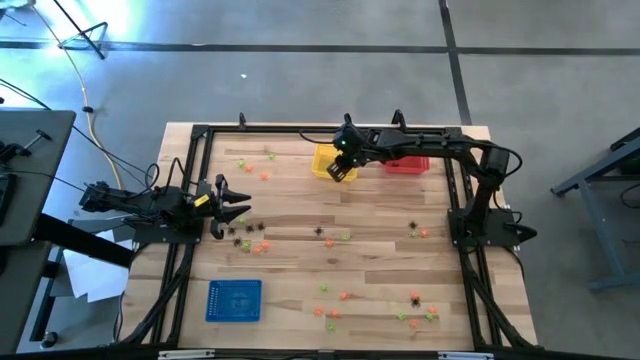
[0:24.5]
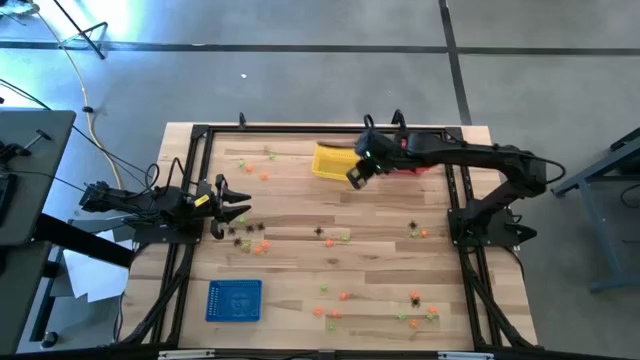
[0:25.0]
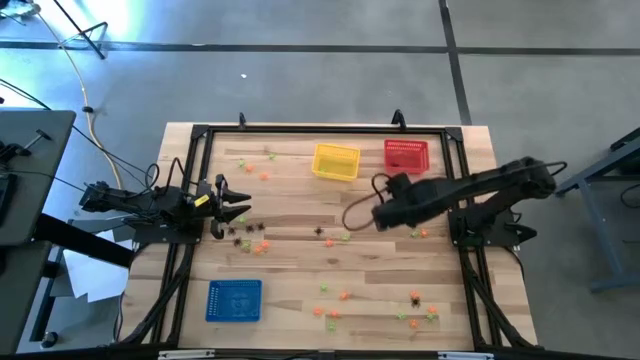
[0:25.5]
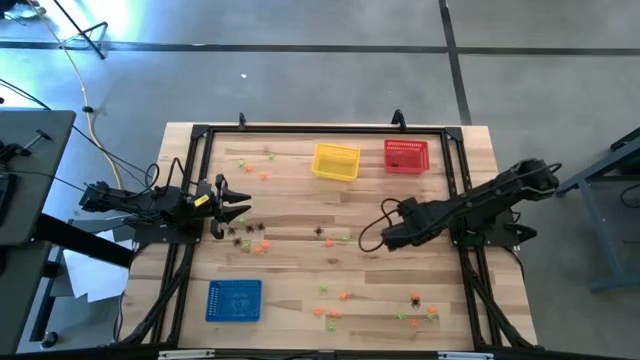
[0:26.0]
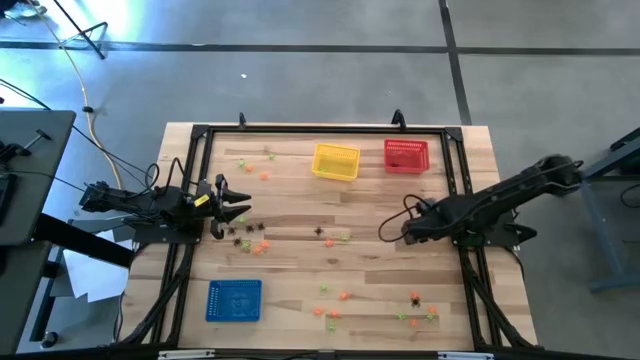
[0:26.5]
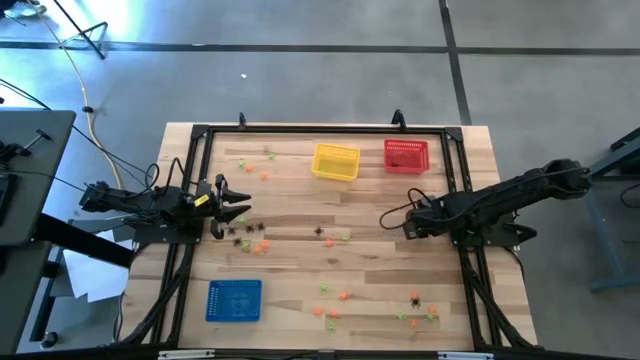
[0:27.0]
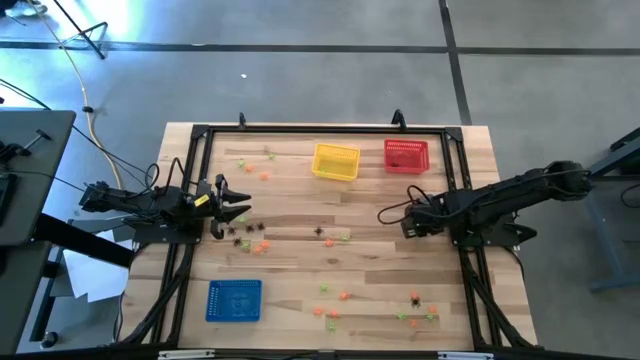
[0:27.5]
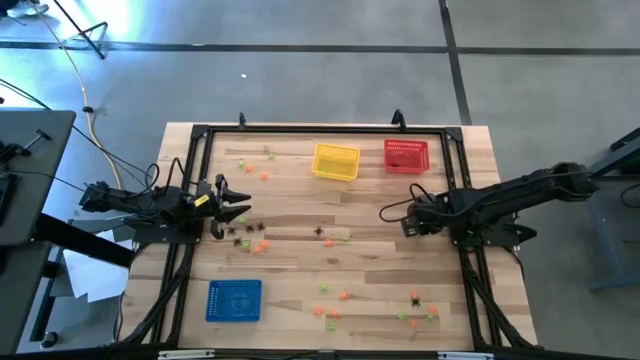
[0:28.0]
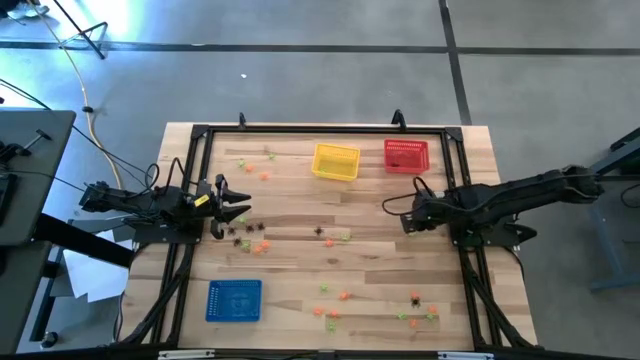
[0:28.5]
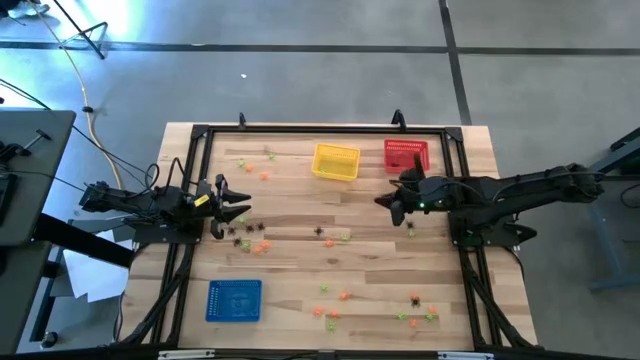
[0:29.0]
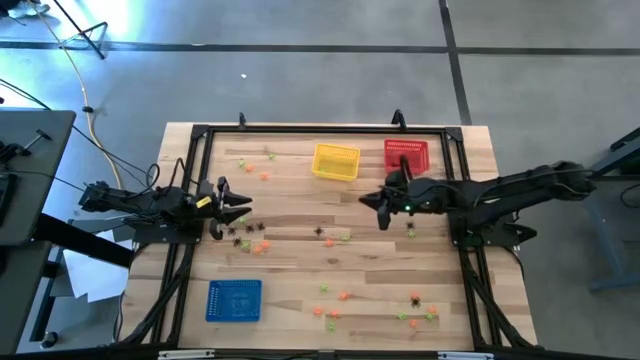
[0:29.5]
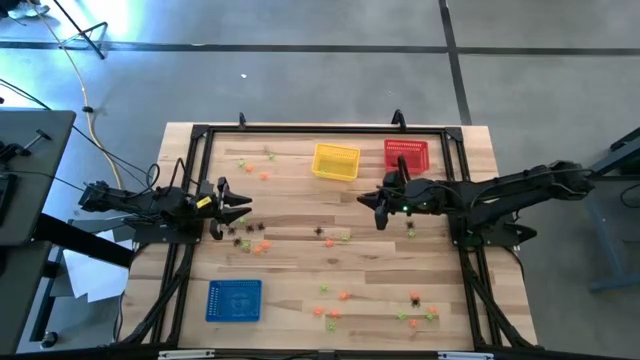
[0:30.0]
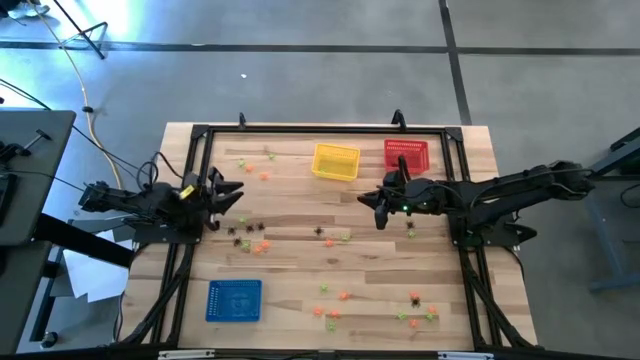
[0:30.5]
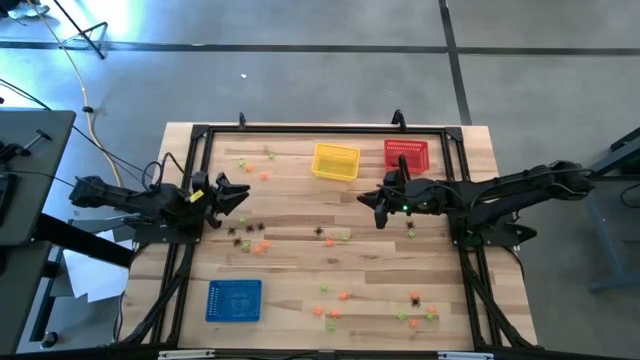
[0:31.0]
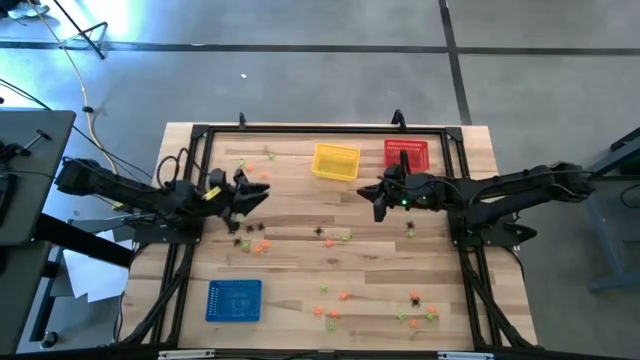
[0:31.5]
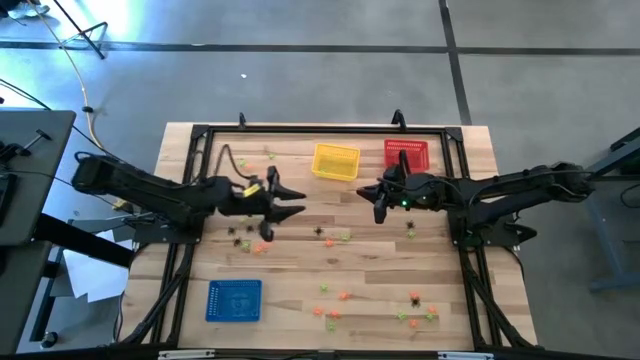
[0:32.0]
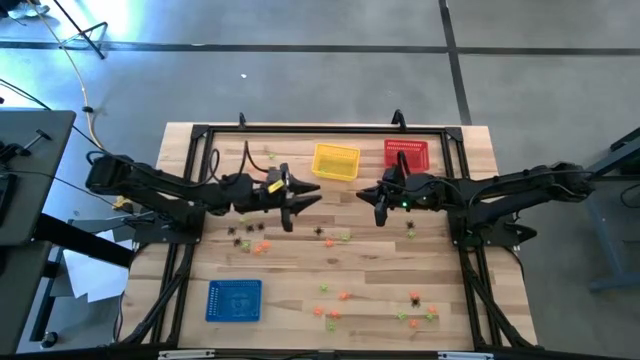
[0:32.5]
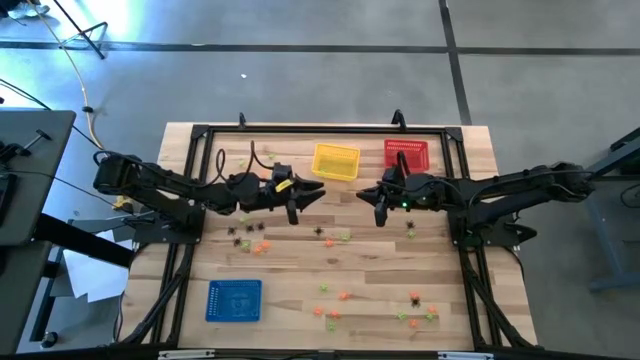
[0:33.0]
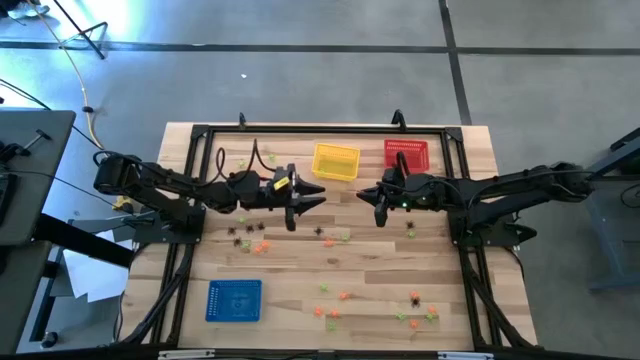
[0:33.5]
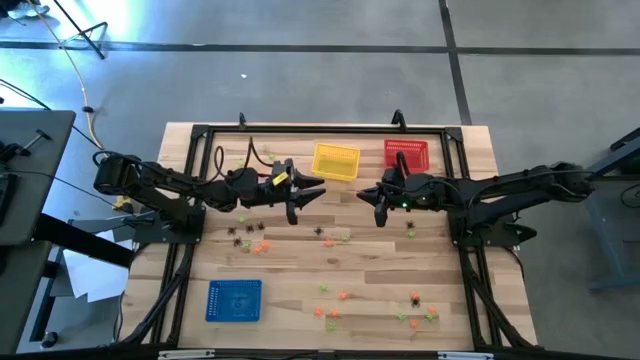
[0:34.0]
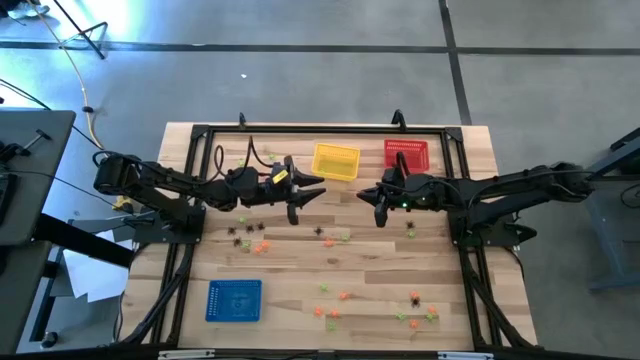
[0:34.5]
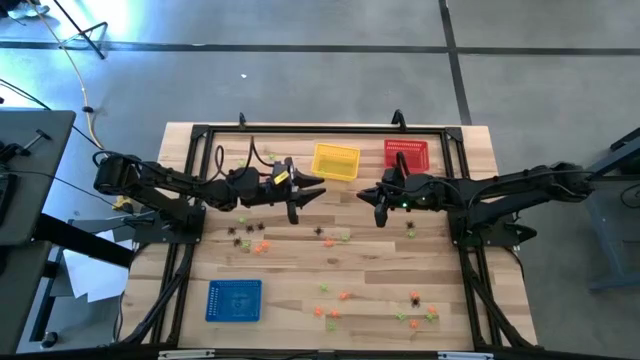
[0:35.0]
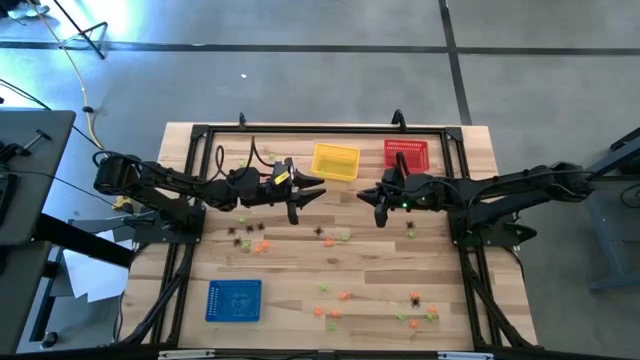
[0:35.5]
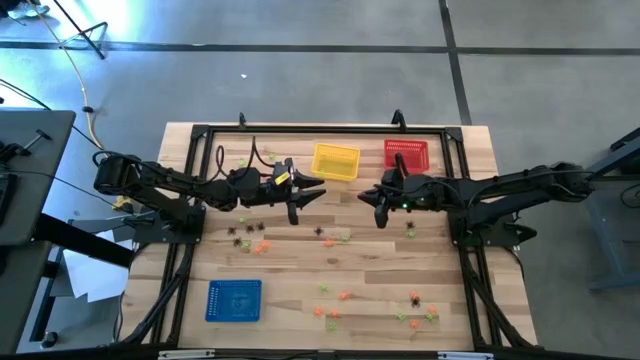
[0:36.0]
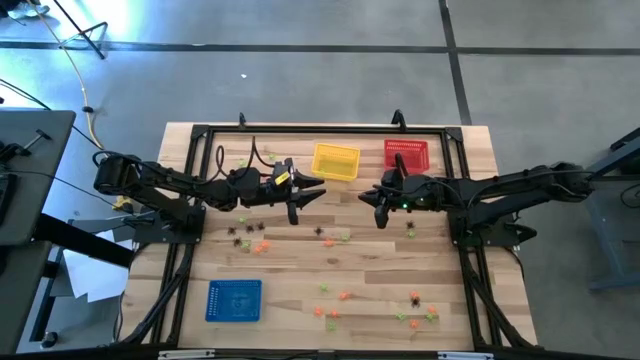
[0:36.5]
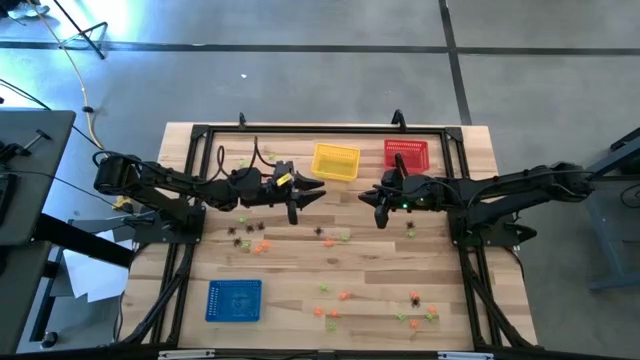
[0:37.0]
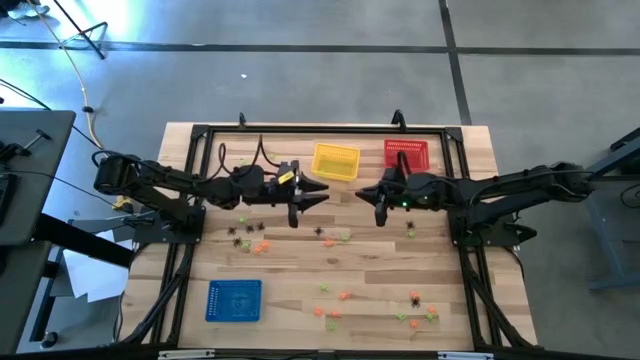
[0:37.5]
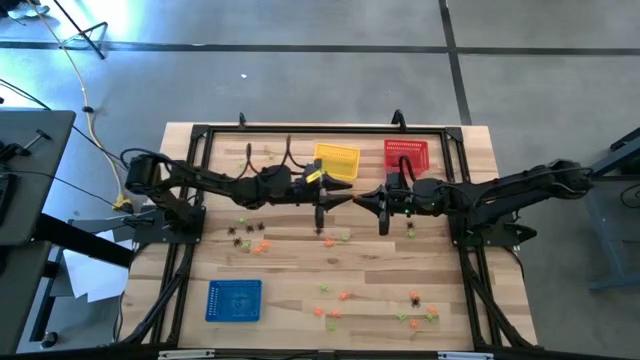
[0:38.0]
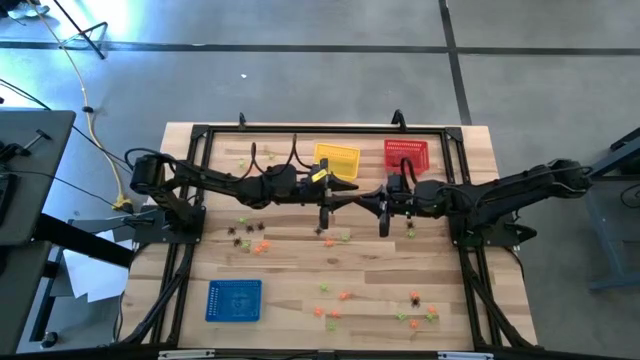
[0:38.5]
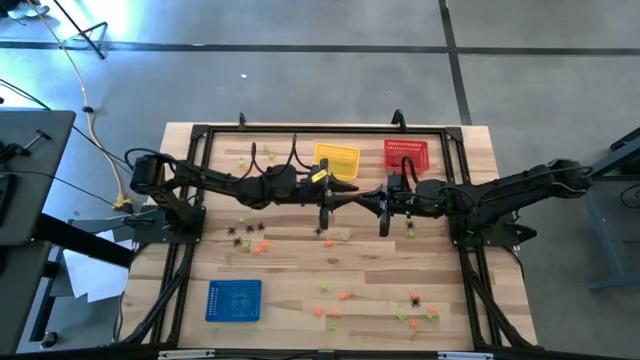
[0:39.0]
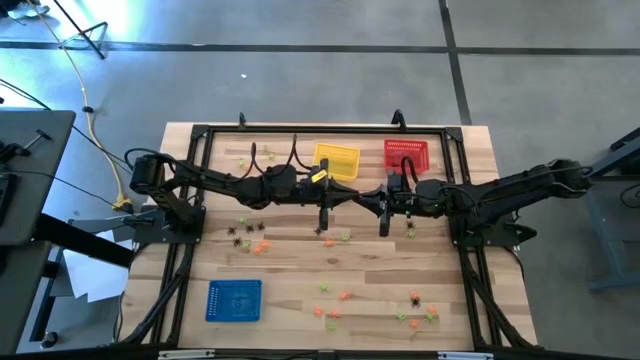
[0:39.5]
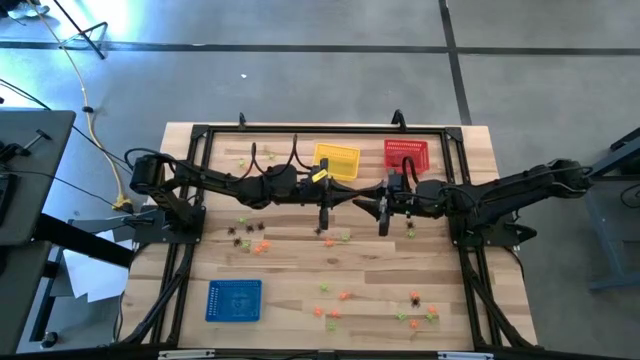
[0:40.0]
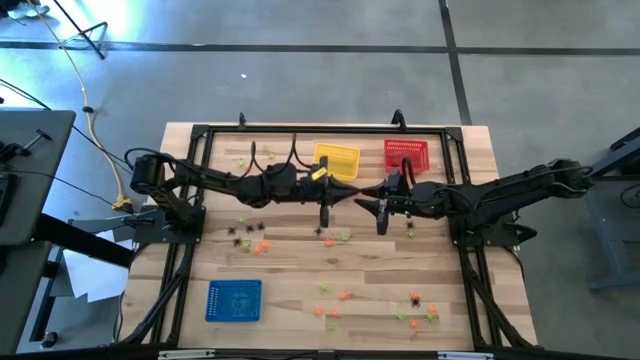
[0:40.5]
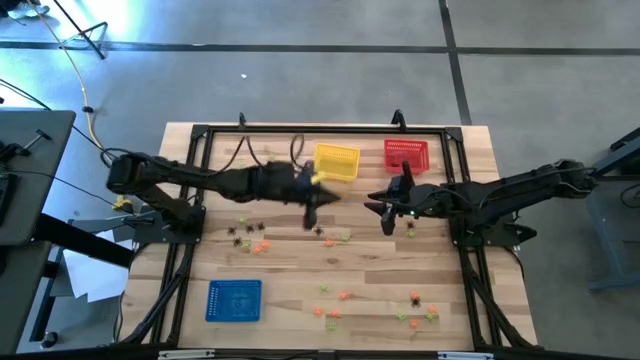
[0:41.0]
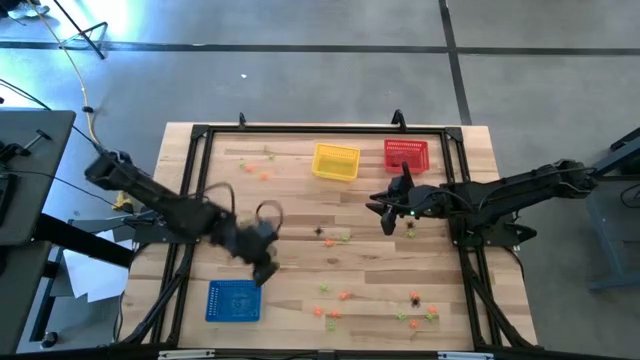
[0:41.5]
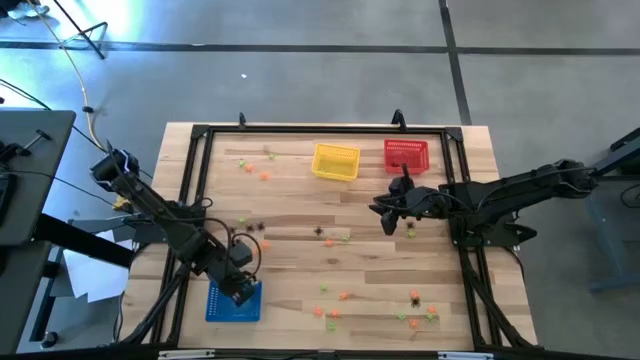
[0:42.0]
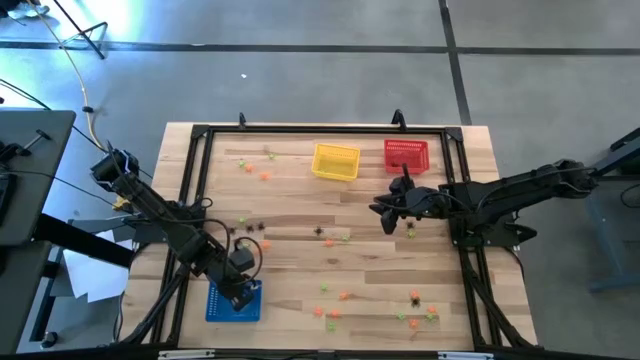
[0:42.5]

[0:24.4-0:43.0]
Task: Sort Halloween decoration
Put the orange spider toy into the blue bin

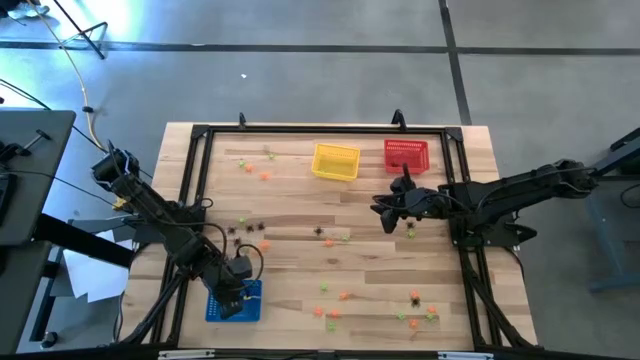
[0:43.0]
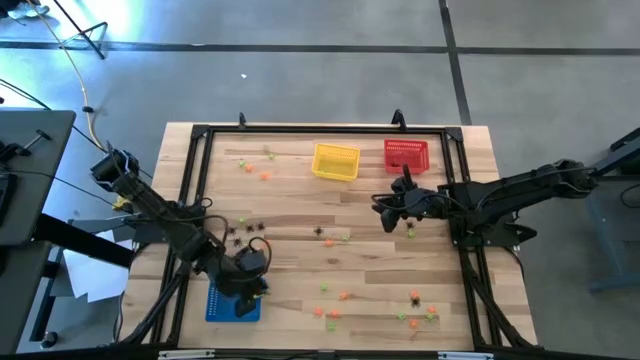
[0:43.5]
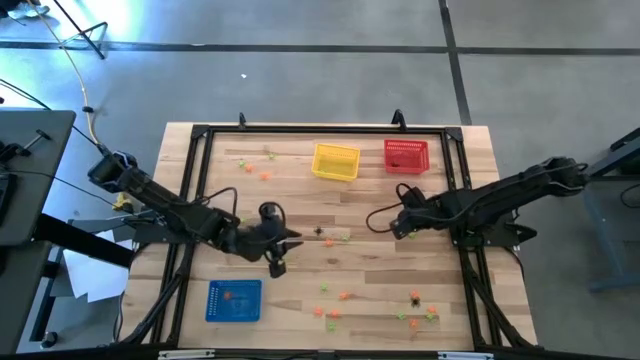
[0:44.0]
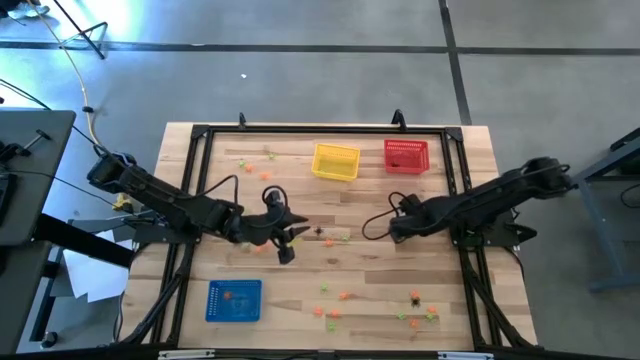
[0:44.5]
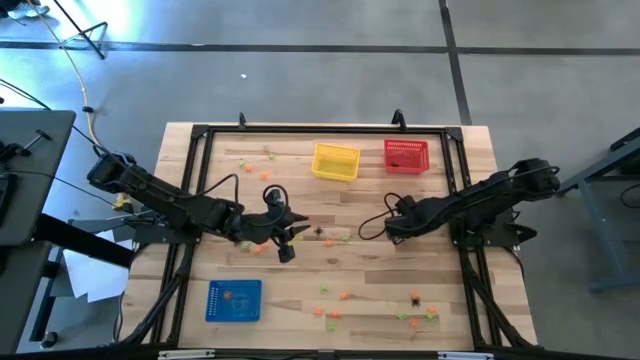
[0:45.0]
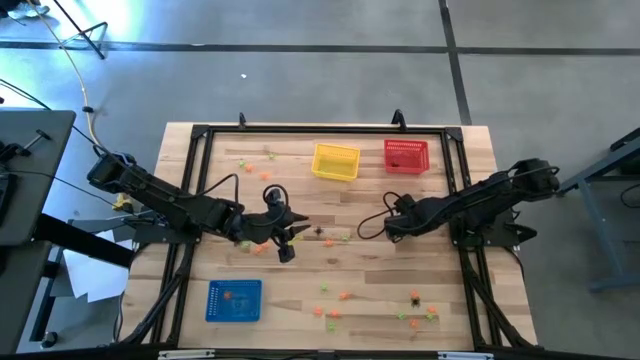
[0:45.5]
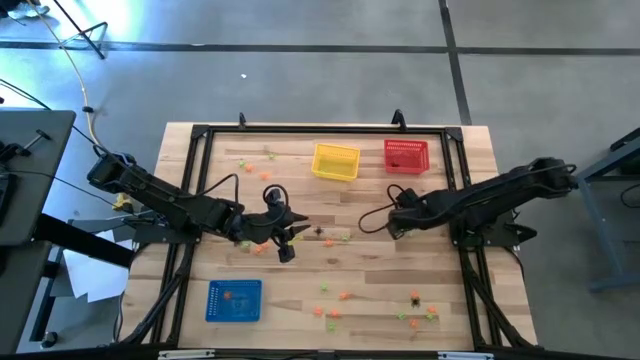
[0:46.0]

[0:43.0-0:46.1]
Put the black spider toy into the red bin
